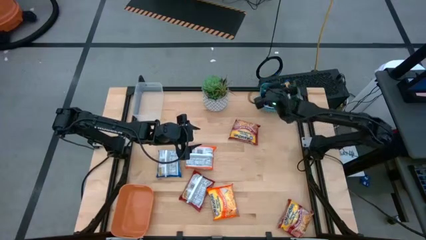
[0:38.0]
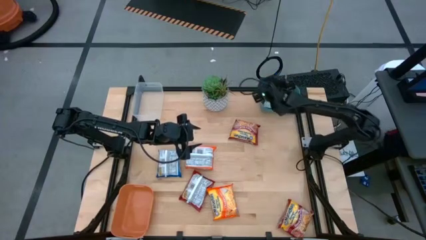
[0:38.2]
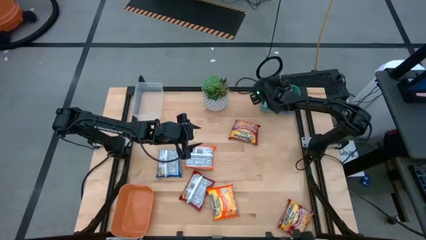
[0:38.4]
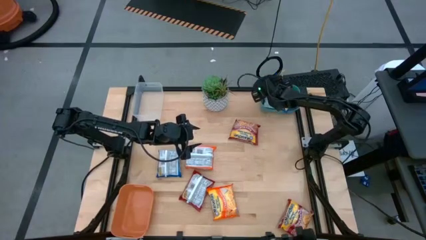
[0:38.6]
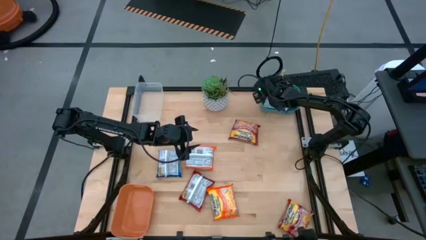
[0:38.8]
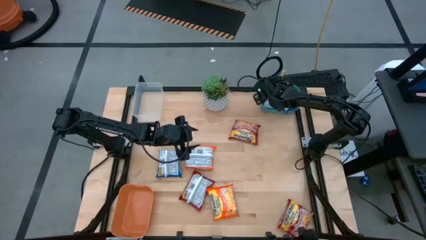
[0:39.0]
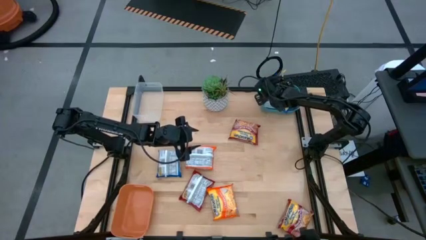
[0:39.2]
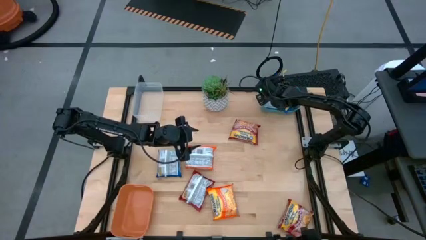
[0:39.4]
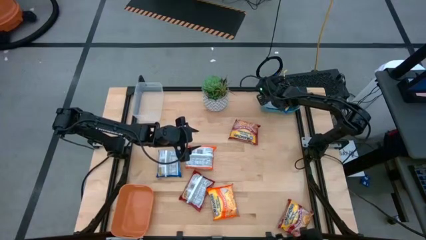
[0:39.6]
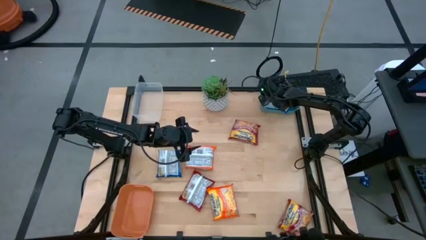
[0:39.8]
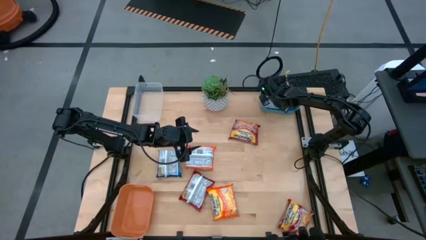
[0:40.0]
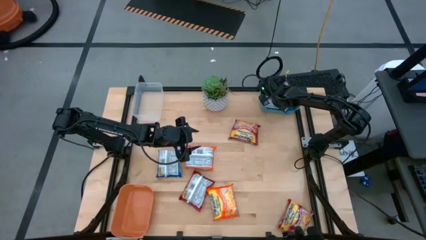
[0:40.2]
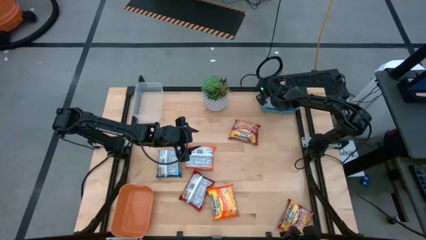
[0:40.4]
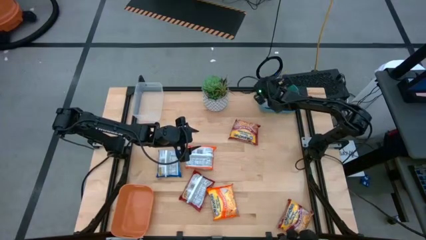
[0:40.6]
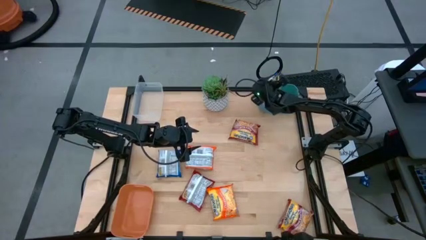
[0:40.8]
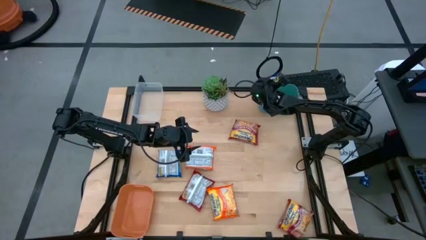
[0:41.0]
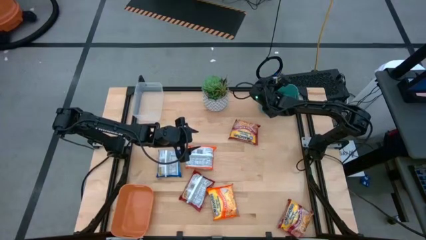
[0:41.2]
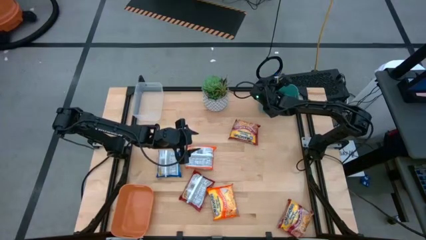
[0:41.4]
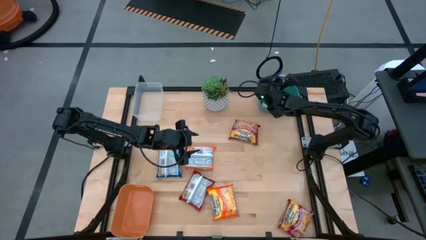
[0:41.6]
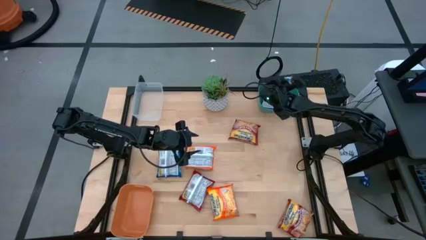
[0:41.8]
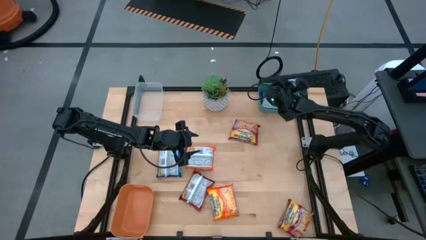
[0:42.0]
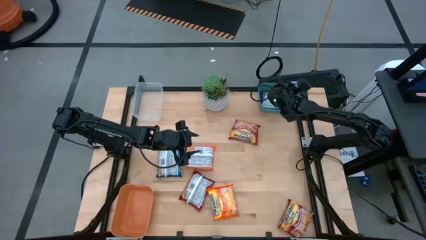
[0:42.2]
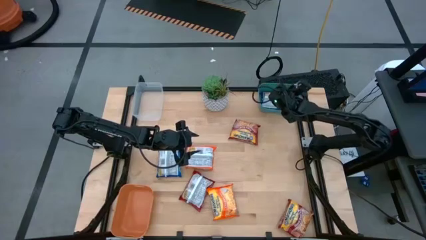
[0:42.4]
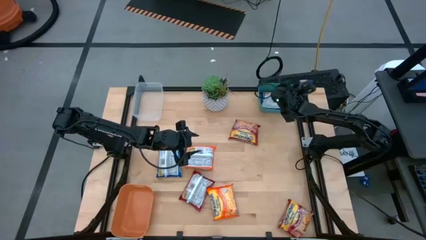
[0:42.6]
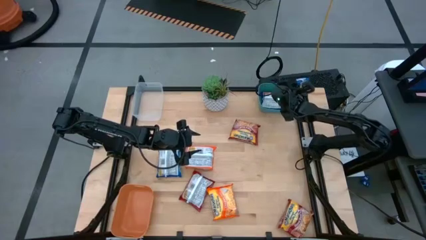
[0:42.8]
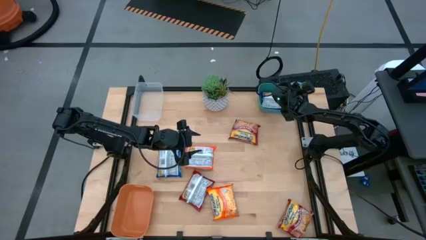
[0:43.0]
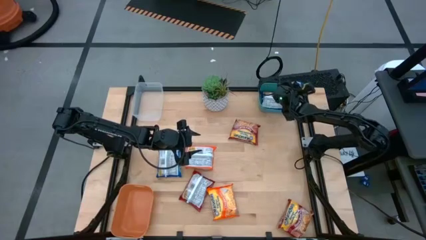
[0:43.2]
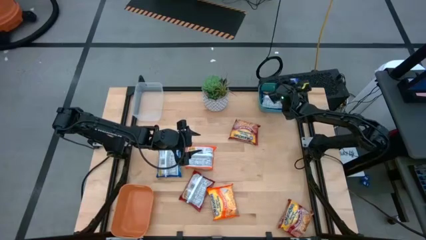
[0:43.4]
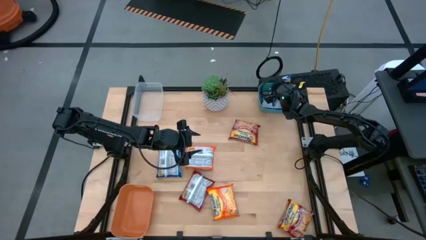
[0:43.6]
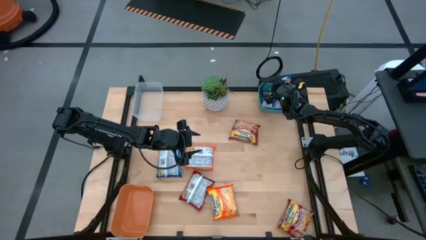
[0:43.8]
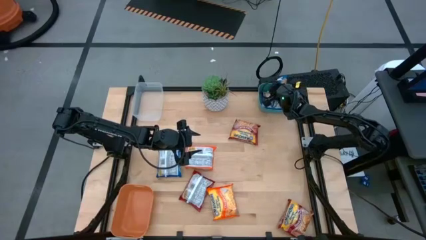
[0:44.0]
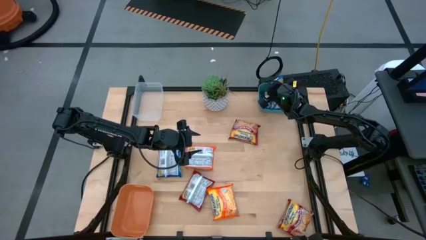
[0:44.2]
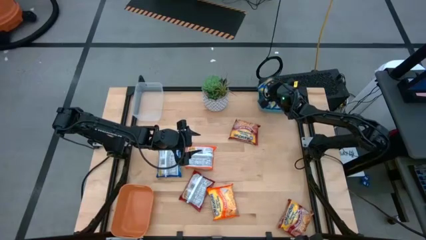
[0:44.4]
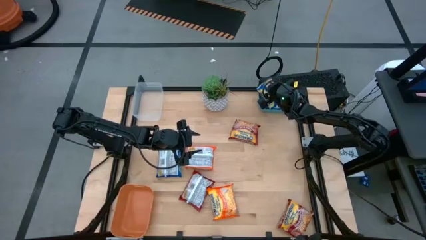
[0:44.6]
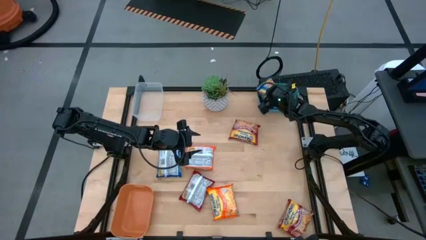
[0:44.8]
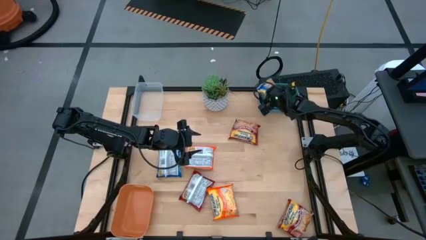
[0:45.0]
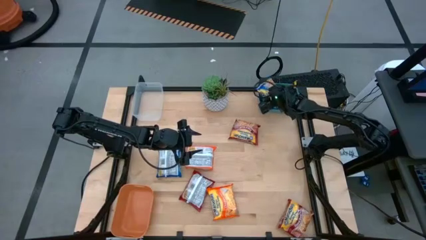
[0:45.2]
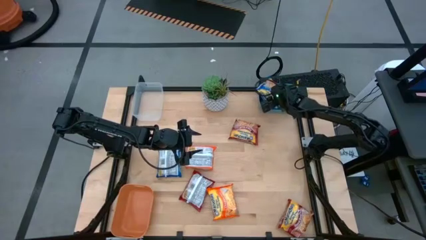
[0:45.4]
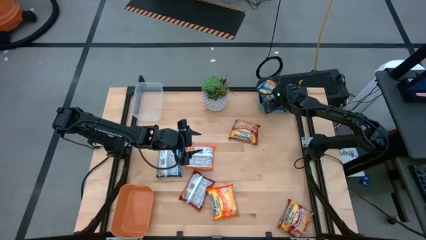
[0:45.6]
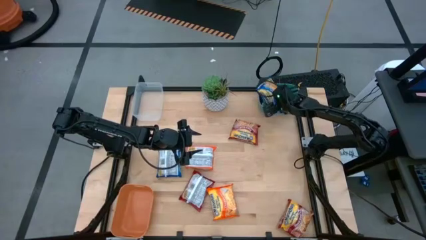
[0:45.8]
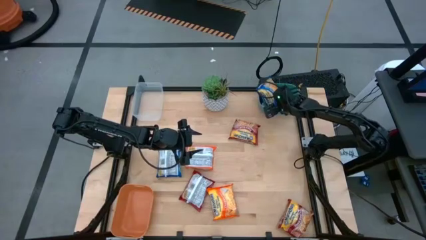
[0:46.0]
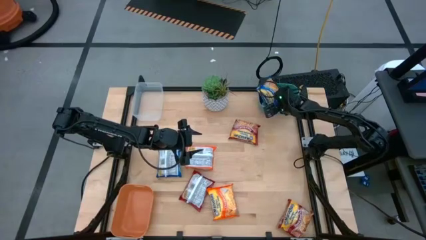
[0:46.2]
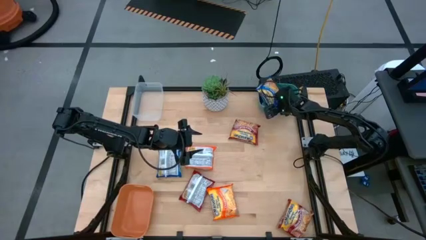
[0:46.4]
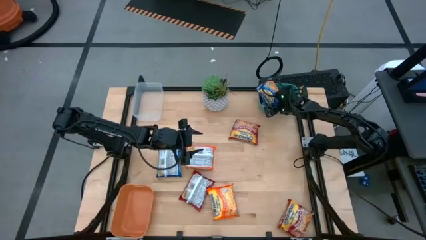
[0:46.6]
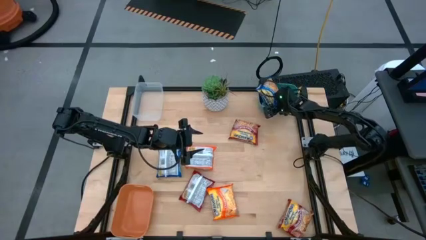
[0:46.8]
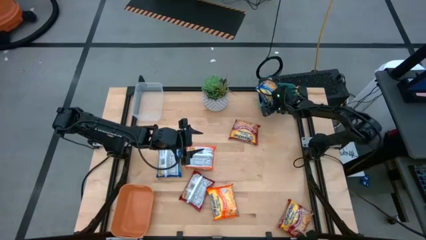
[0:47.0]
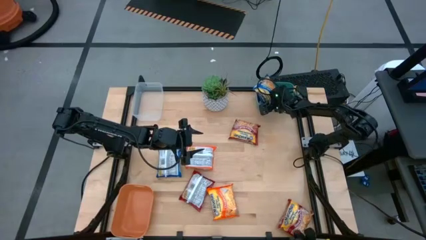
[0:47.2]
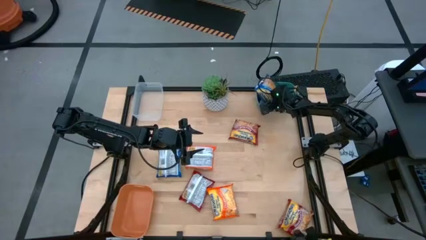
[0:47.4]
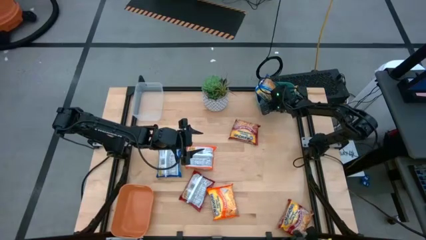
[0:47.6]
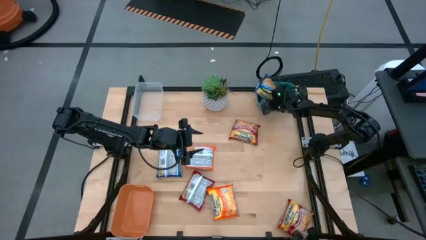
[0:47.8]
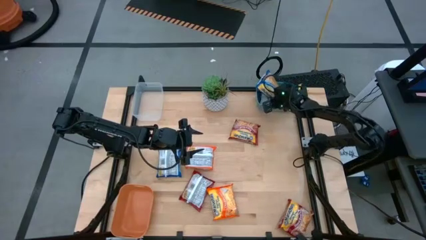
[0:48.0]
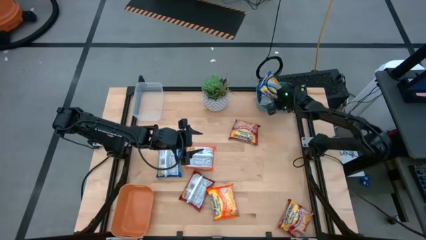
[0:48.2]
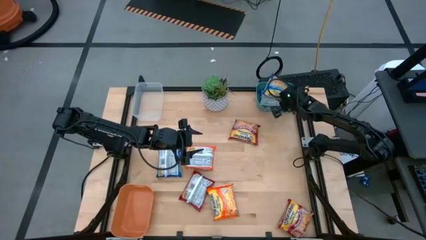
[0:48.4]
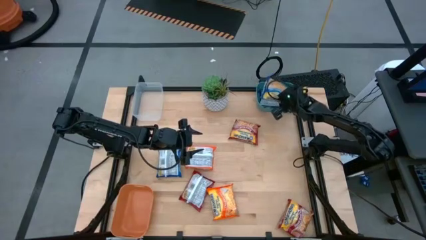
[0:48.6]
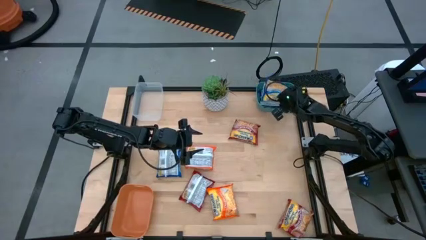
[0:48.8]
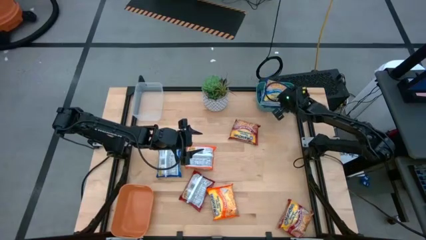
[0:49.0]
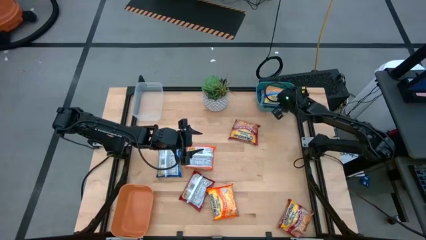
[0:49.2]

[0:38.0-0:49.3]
Task: Sort Maruchan noodles
Put the right blue noodle pack into the green bin
